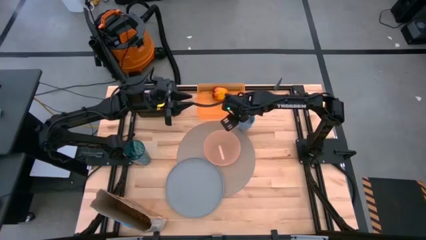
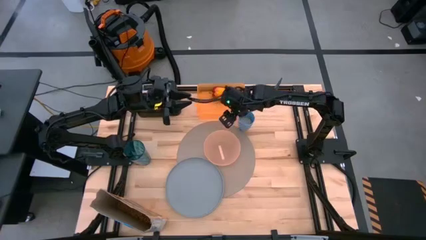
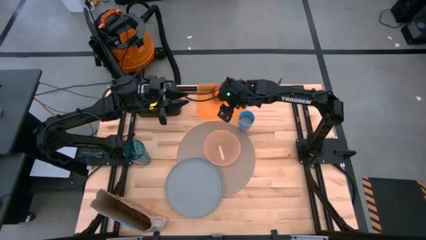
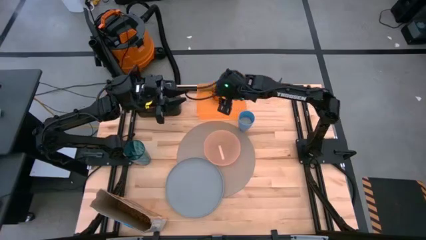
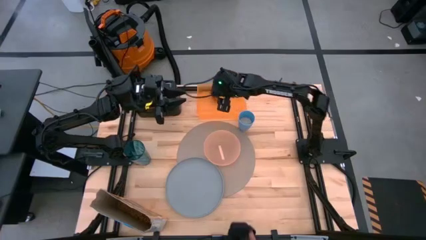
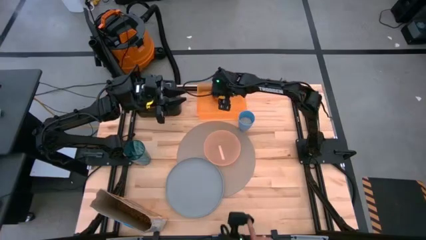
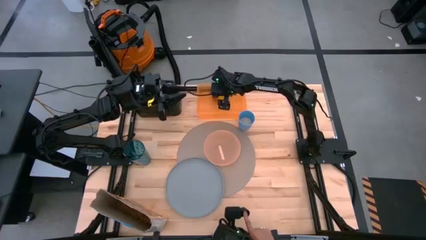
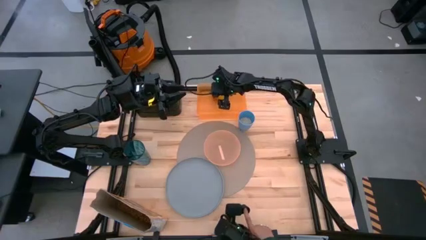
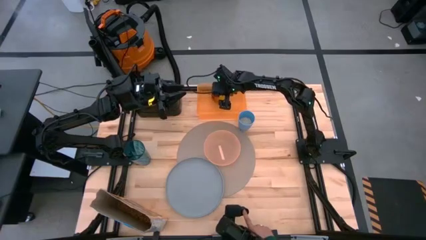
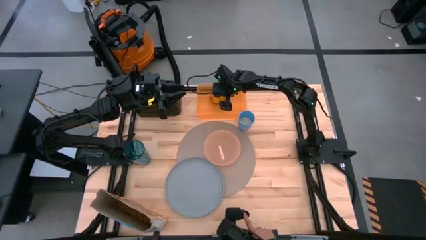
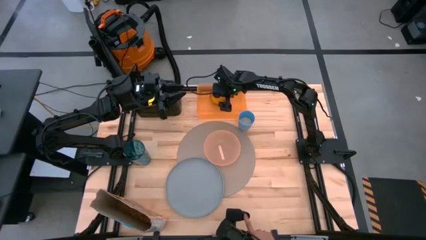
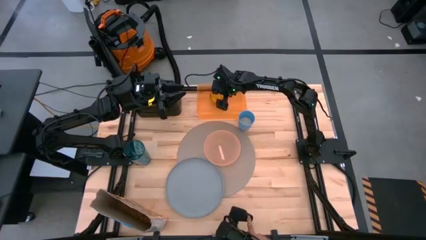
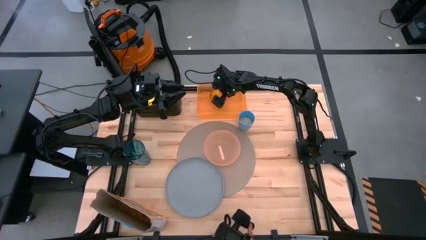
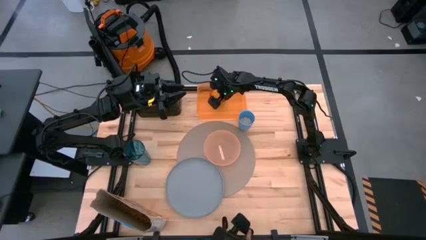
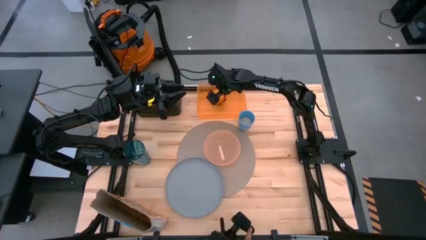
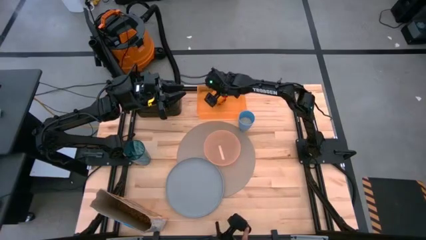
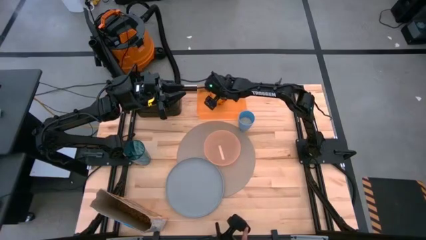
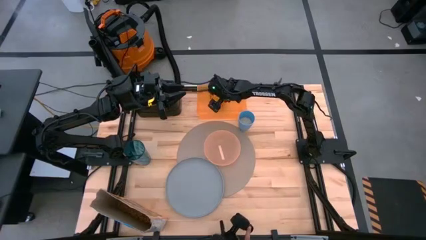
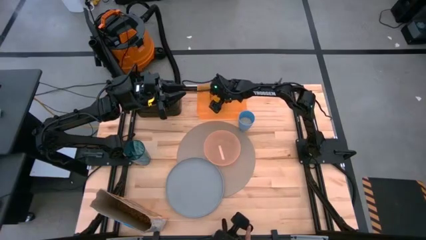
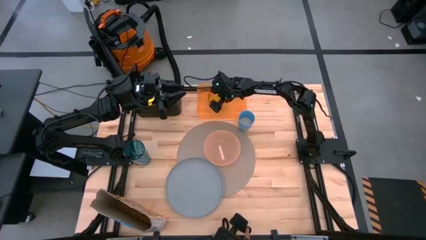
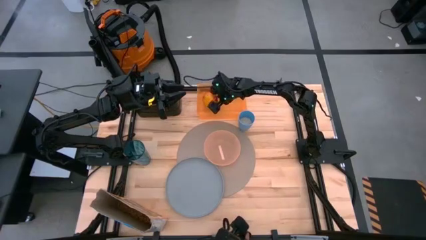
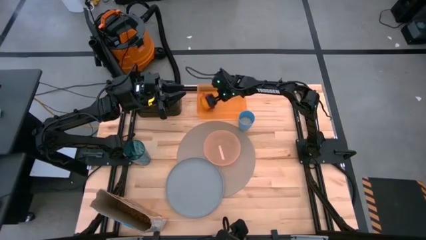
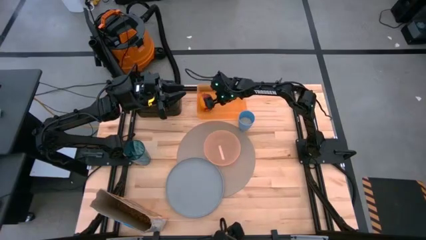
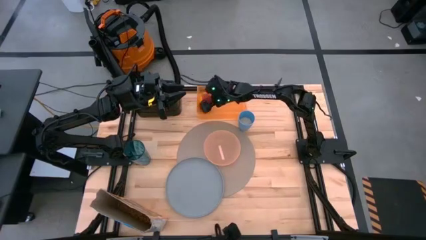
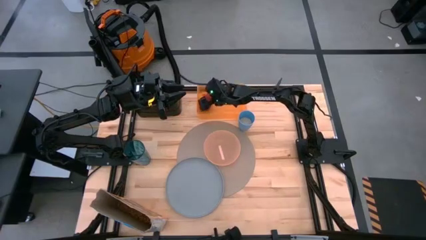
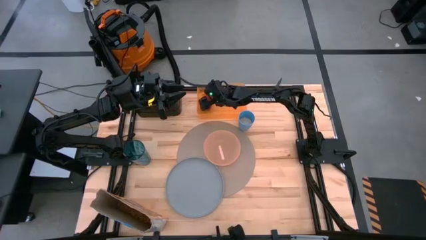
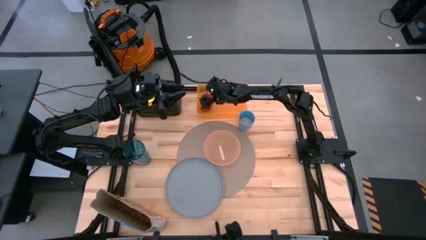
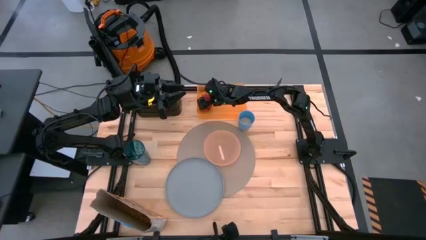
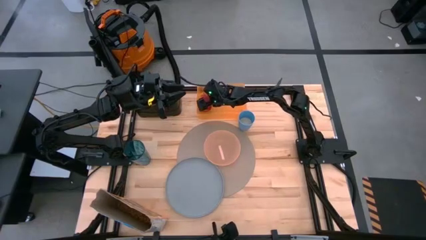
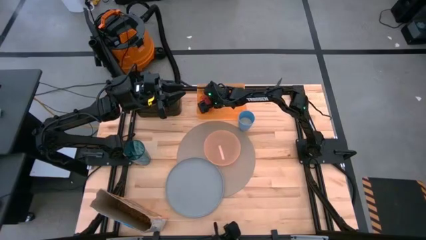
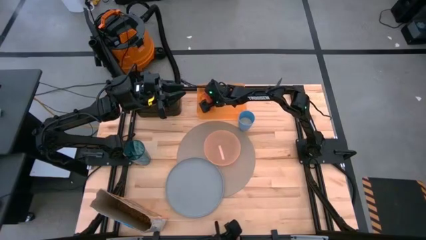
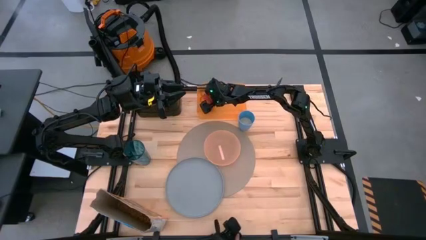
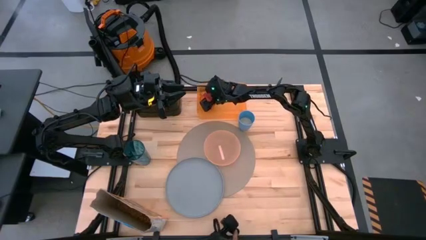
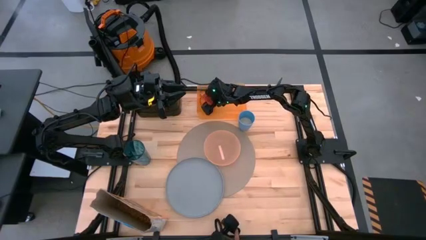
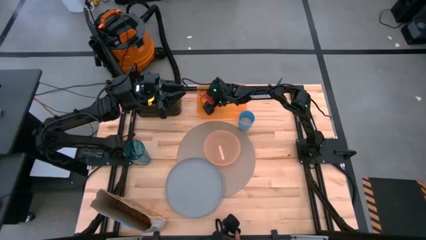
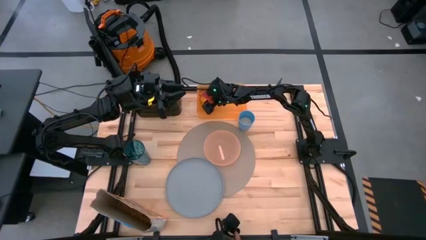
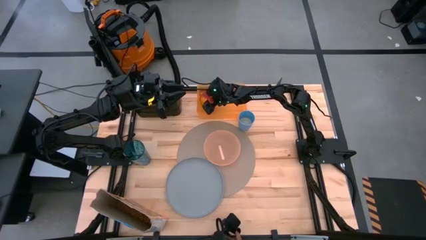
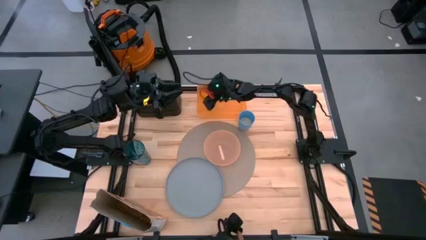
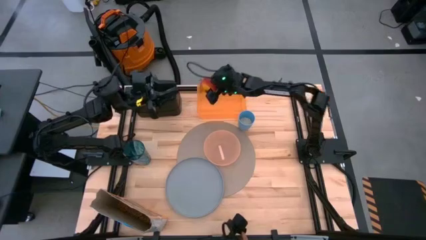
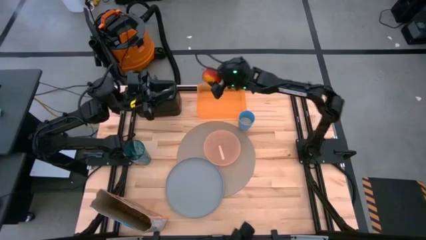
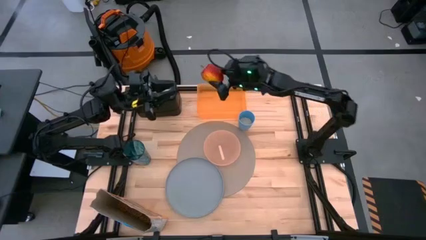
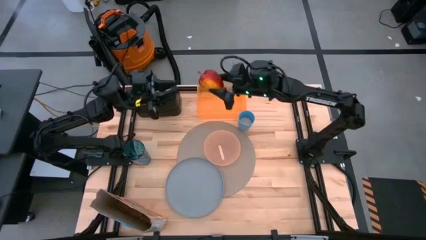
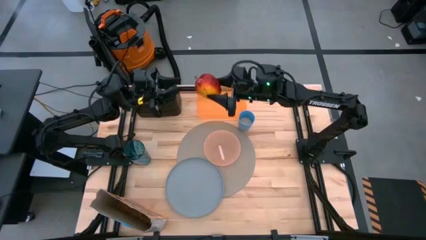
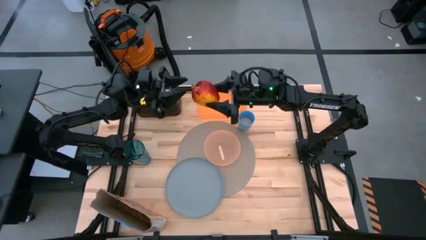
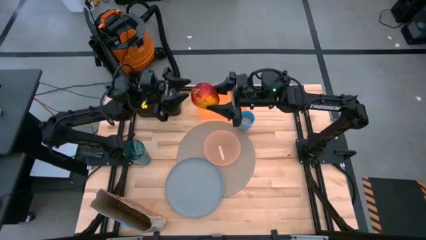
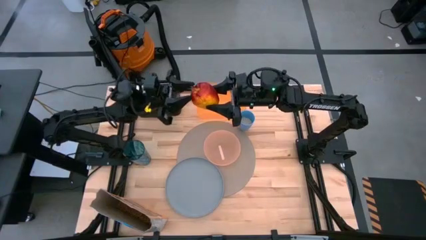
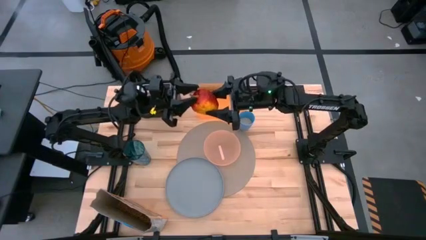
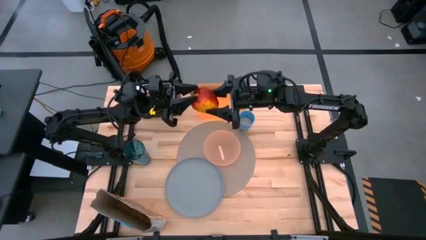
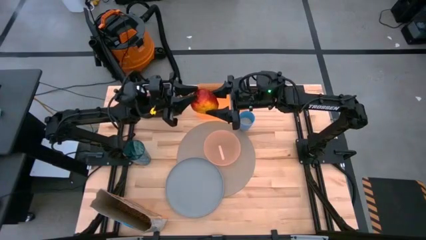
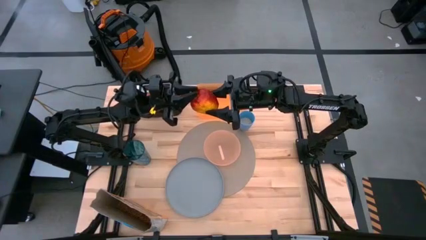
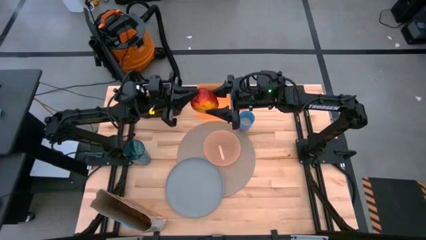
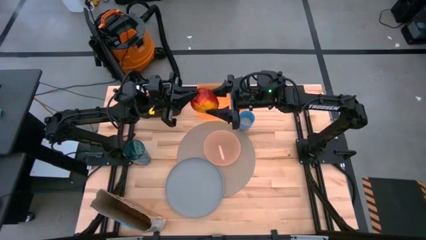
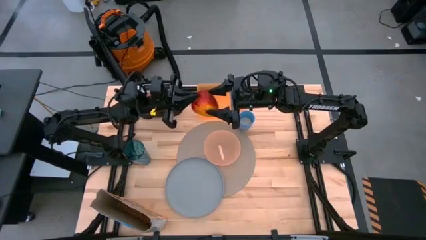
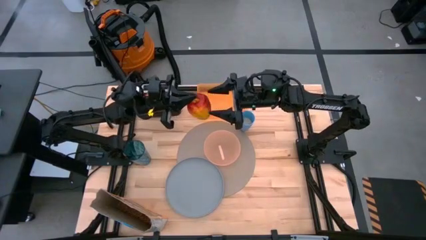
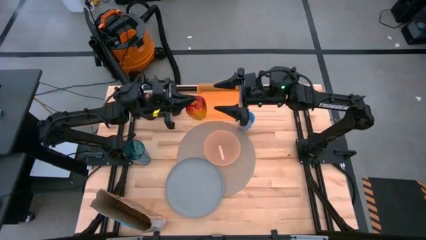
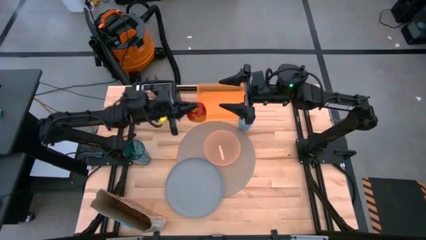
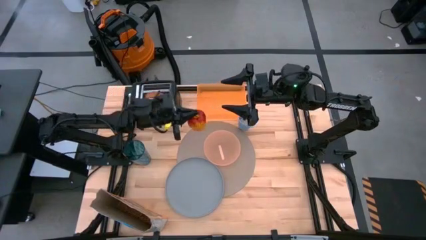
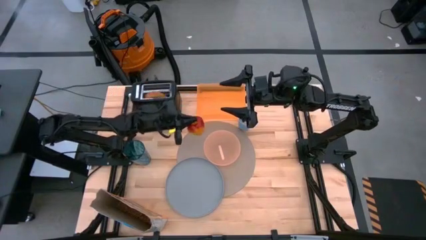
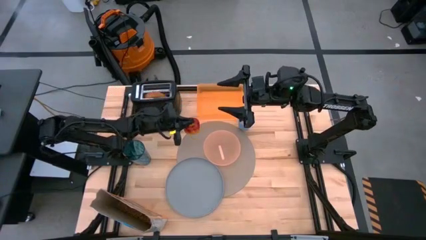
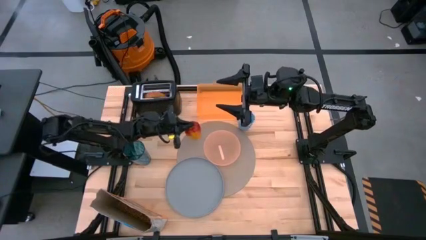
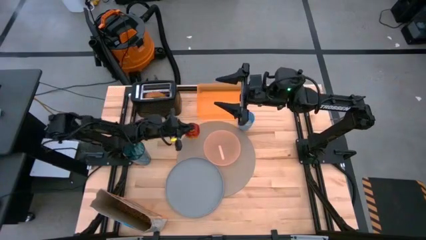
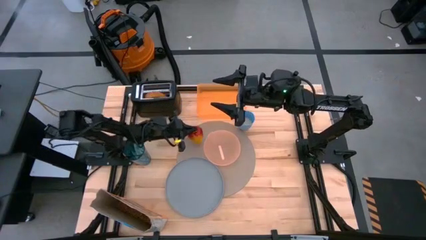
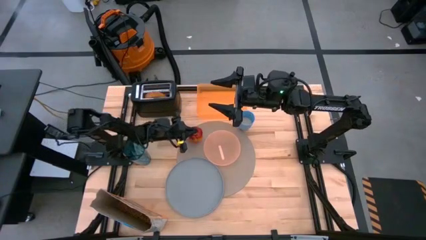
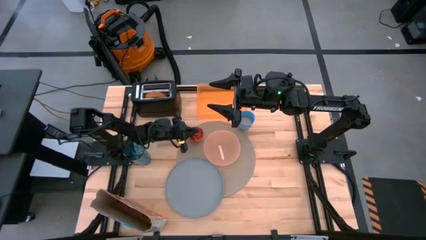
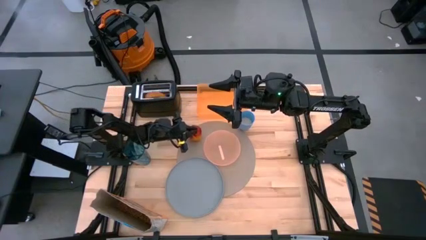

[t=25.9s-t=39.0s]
Task: Arrange a breakfast setting
Put the apple on the gray placemat

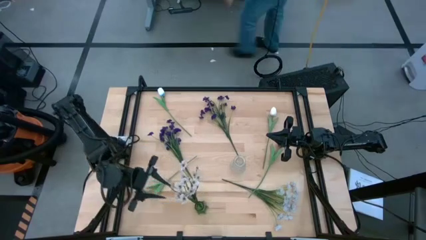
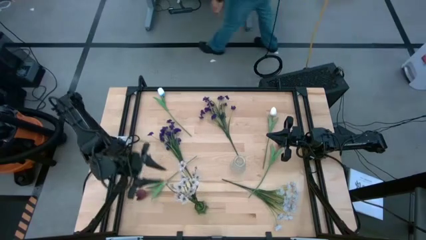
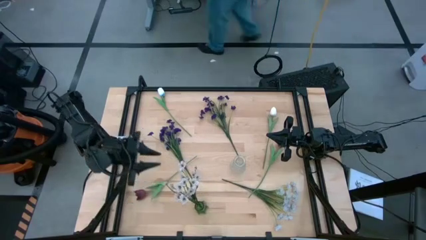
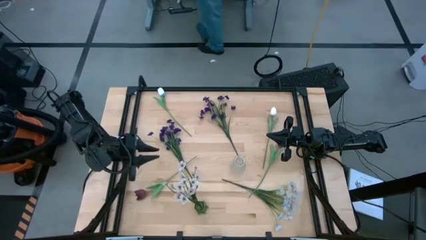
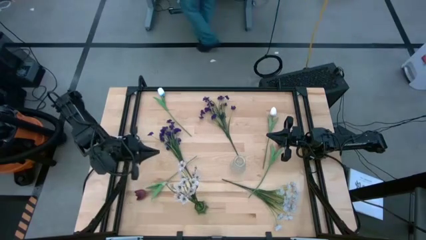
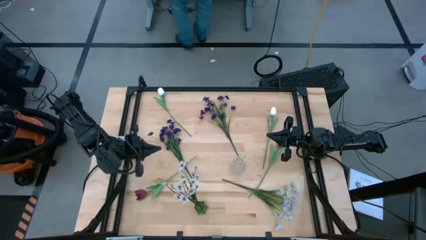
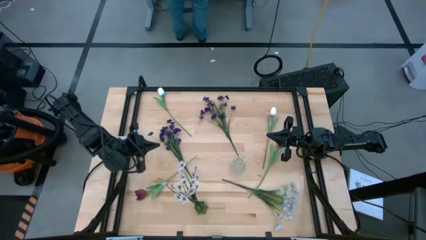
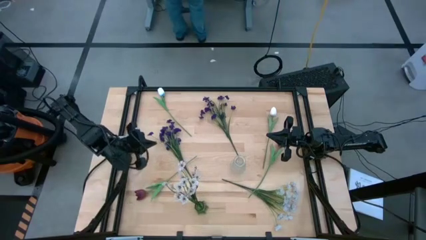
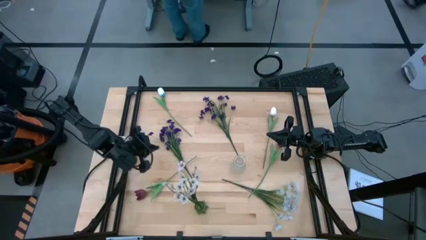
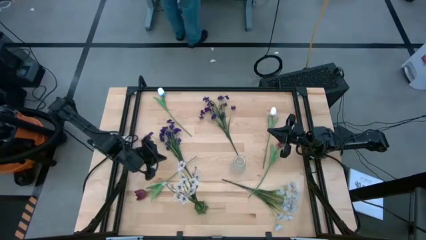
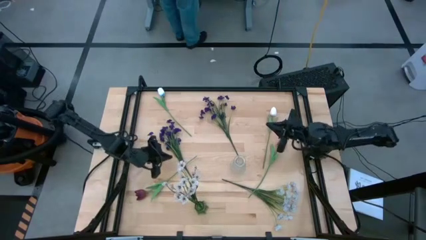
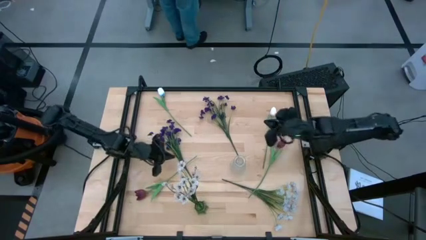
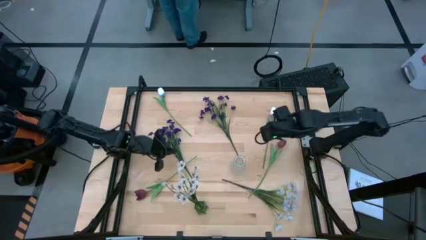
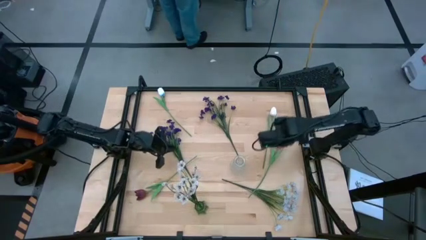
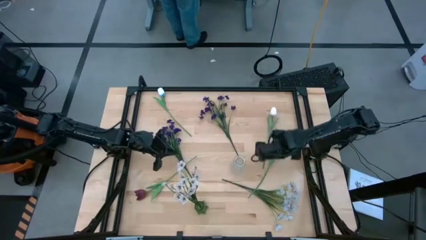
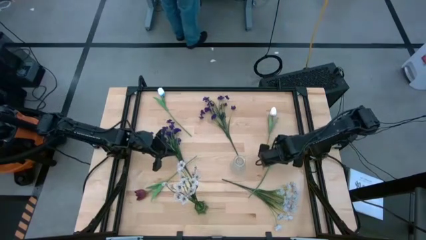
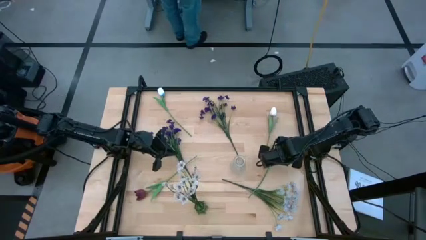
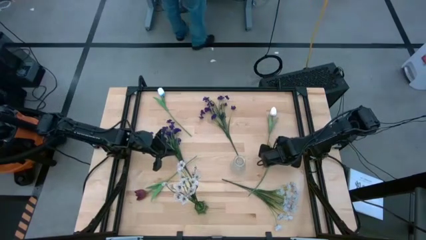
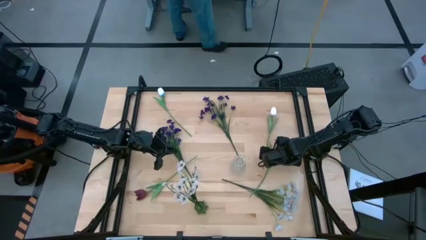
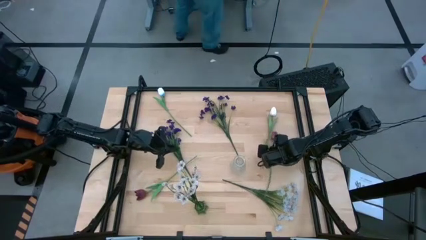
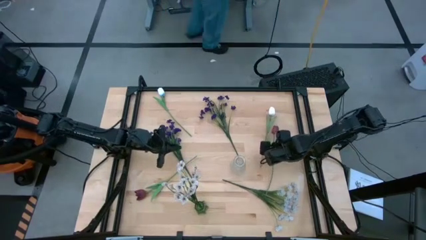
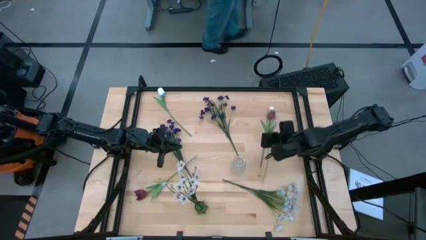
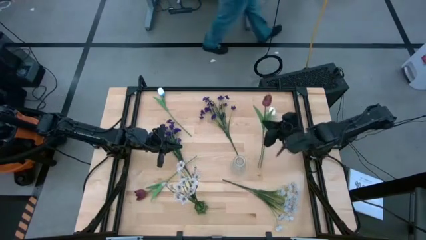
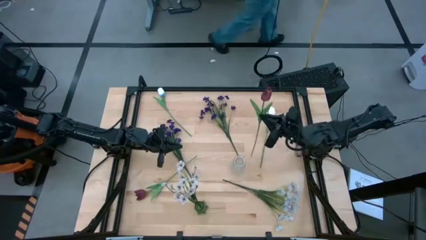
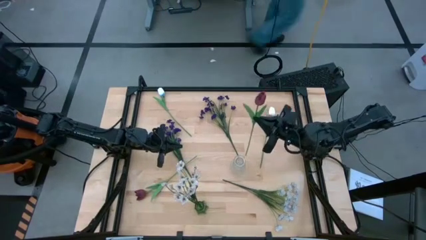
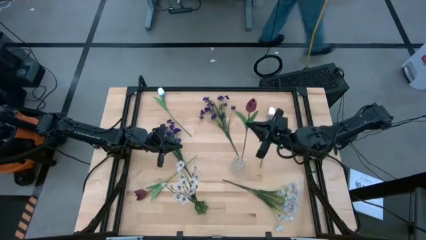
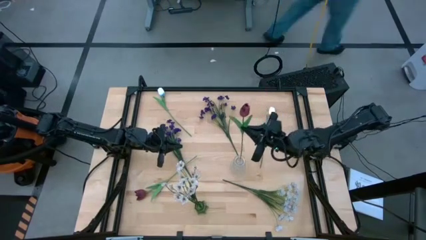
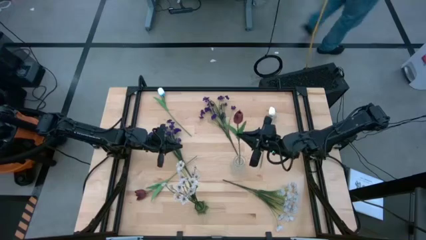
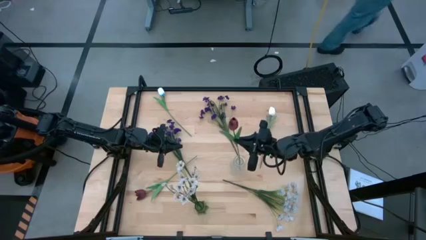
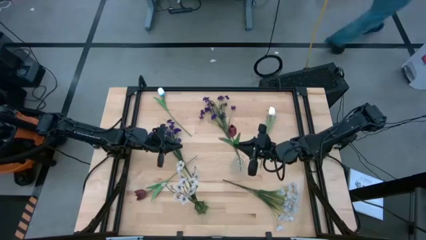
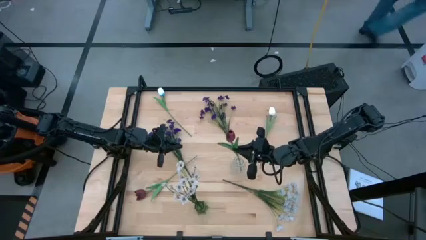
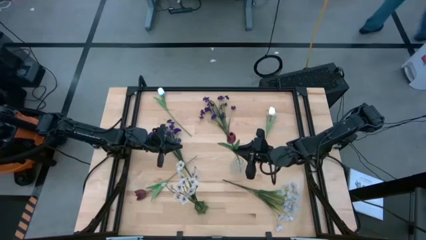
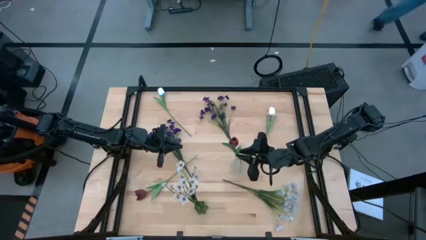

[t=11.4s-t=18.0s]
Task: Sort flowers into vase by color
Put the right red tulip into the transparent vase
